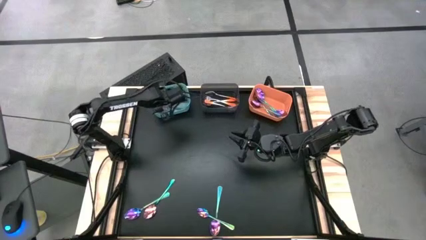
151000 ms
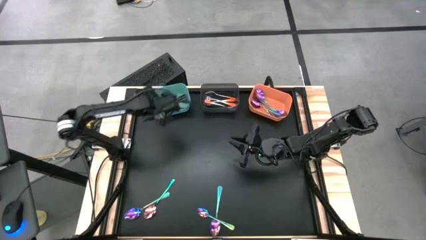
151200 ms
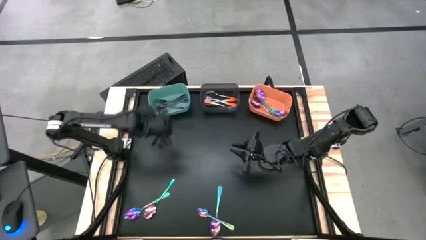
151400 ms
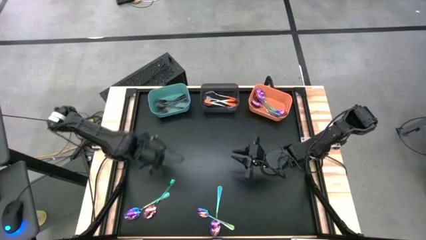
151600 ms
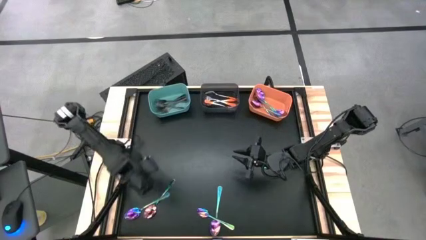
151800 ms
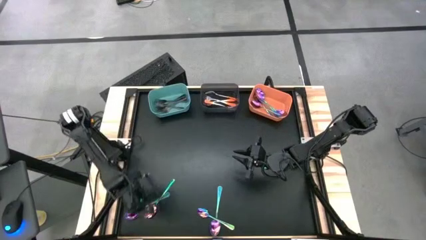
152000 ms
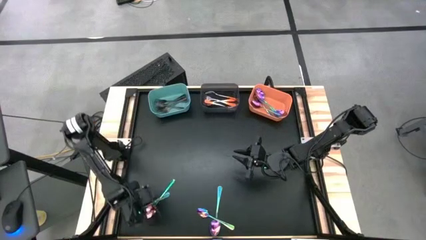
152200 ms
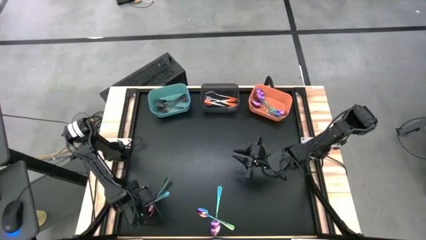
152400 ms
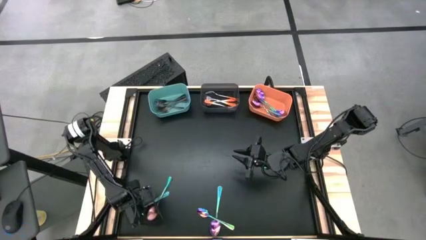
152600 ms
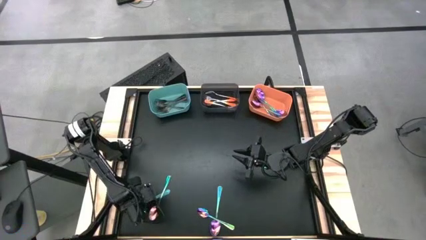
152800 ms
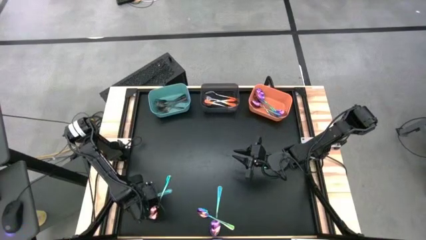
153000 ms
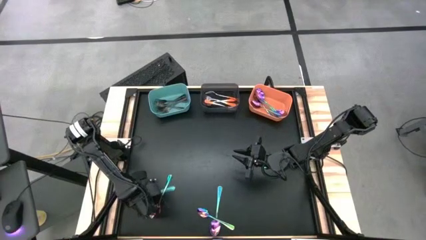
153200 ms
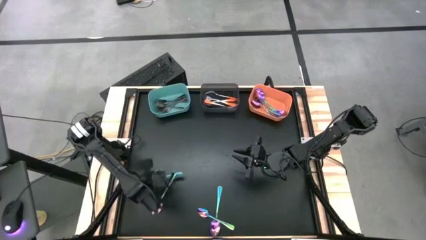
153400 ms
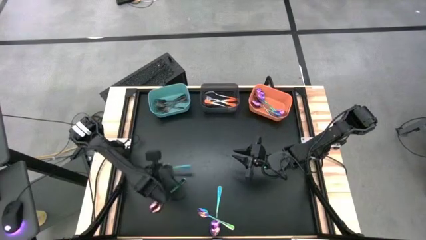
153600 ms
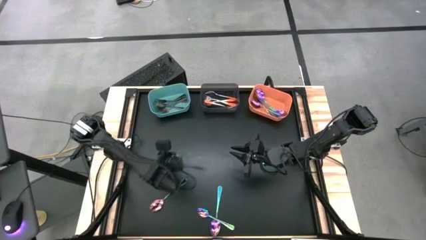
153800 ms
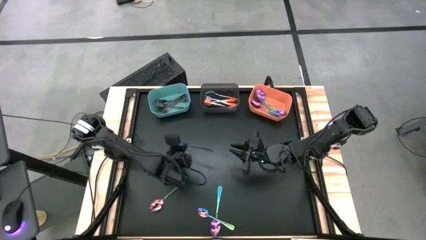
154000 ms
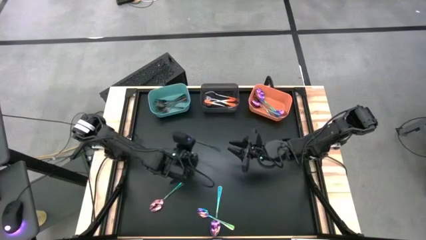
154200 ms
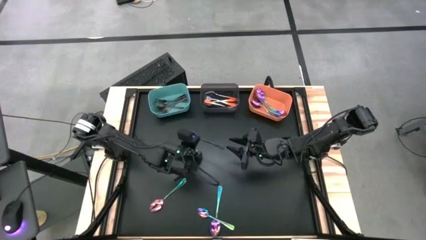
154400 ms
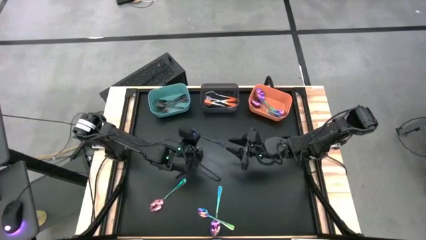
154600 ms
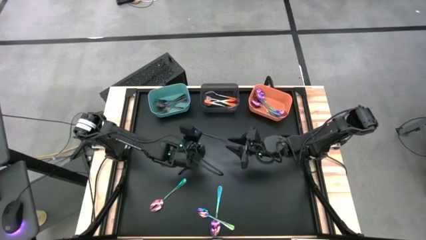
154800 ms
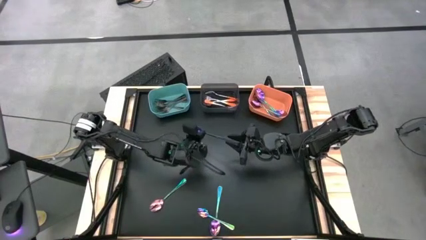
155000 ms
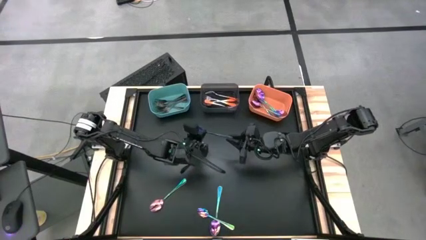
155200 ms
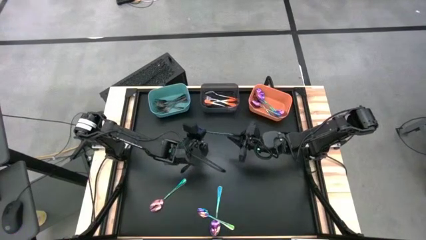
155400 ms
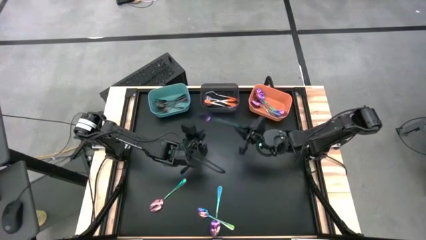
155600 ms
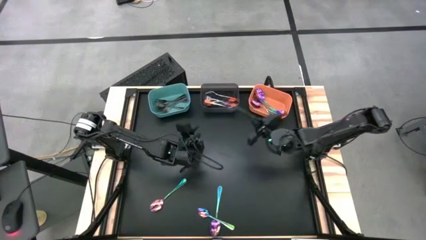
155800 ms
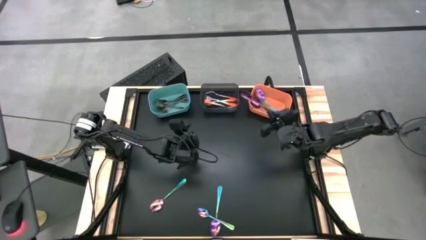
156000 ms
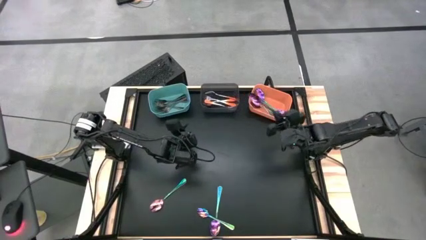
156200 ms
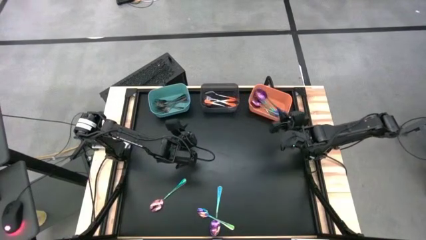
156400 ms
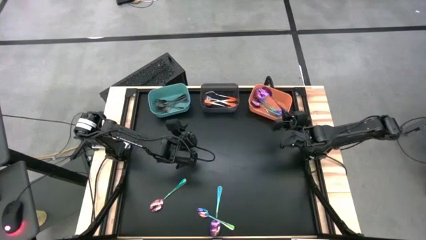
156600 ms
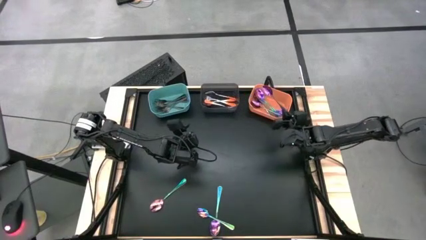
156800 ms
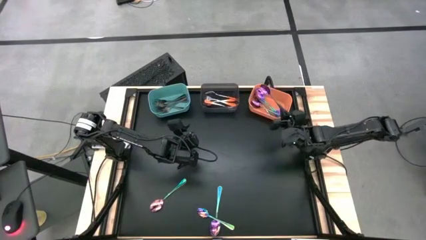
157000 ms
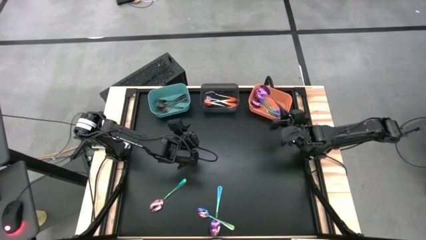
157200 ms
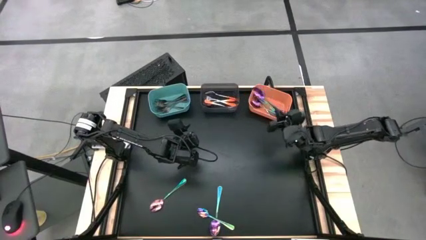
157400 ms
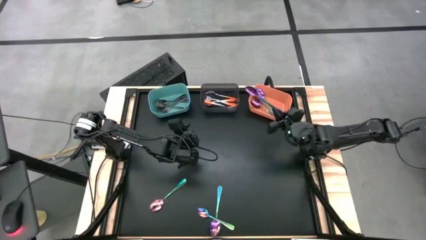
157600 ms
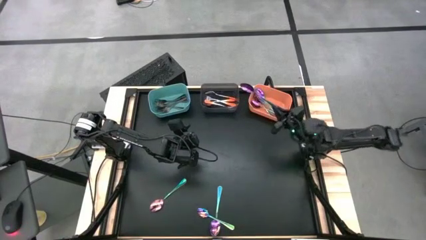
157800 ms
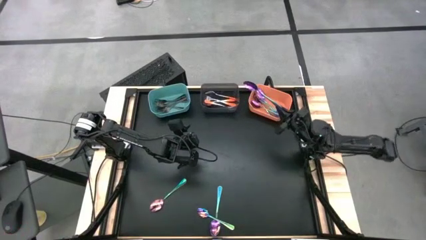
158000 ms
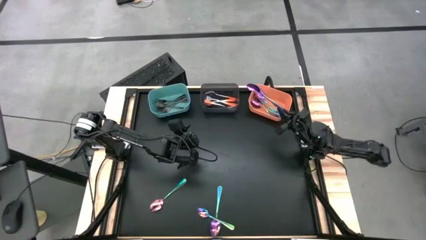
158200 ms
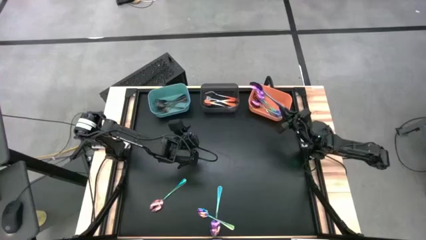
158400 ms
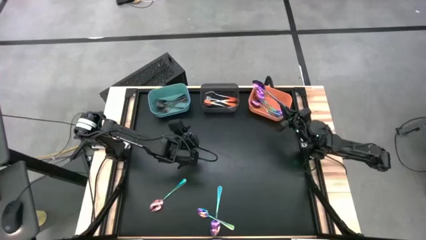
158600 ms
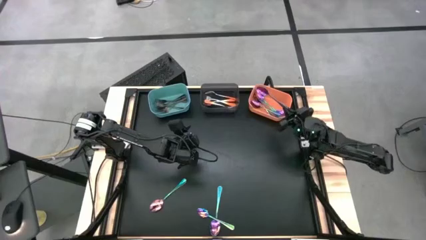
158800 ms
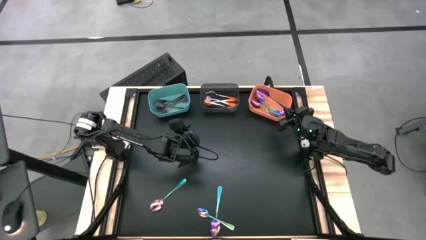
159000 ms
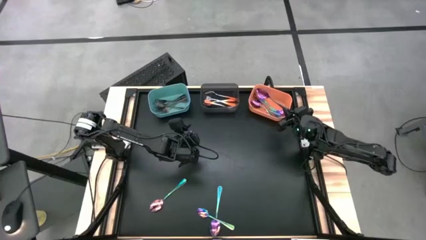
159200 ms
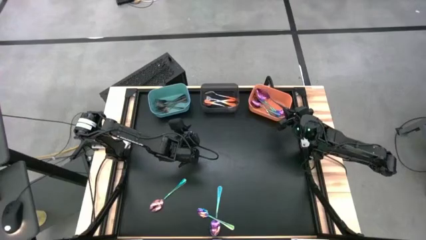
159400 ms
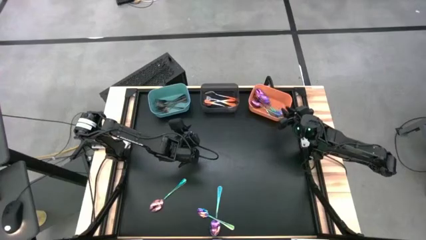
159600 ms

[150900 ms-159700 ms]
Task: Sort silverware by color (type)
Put the blue spoon into the orange bin

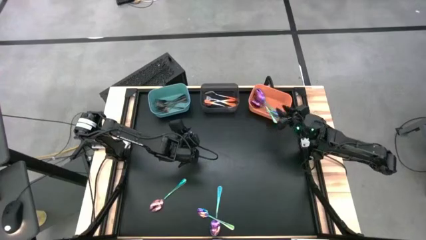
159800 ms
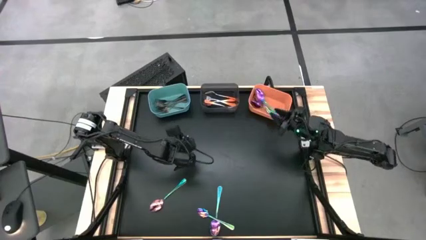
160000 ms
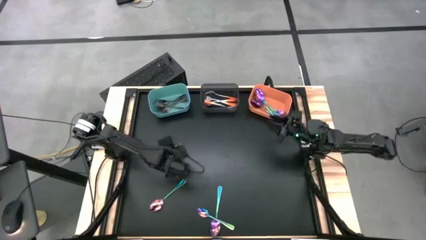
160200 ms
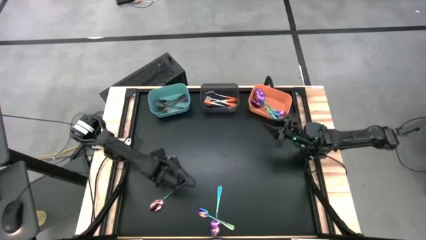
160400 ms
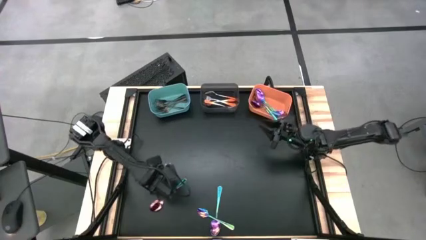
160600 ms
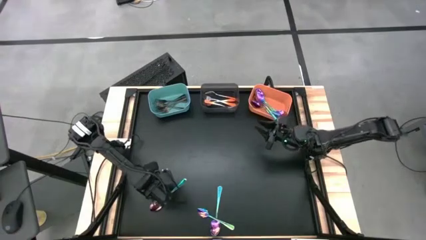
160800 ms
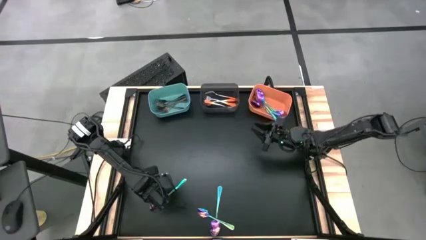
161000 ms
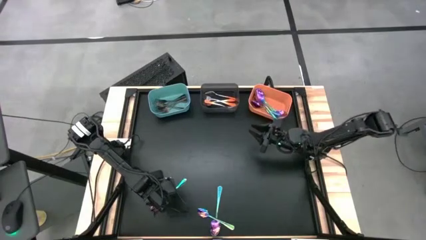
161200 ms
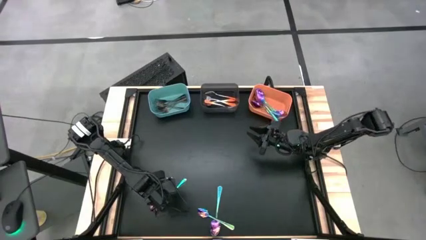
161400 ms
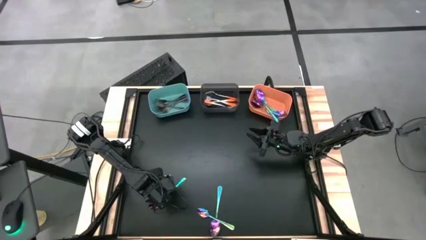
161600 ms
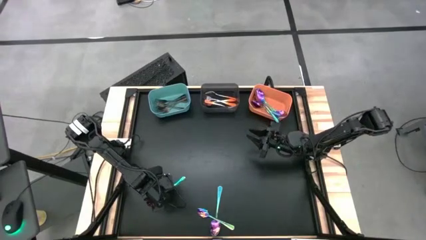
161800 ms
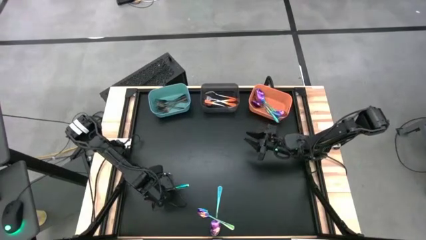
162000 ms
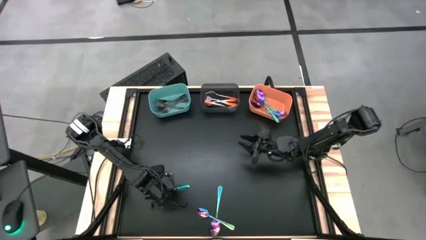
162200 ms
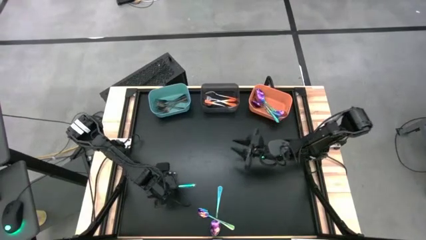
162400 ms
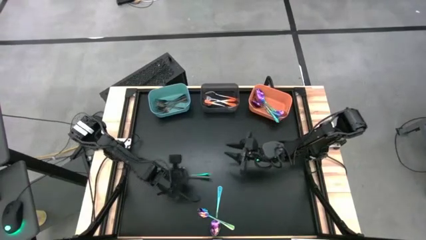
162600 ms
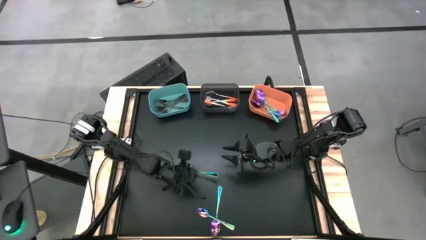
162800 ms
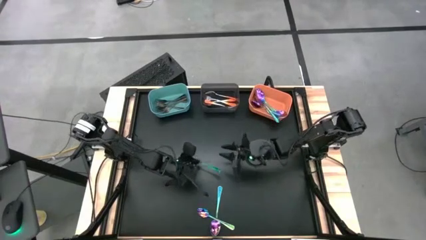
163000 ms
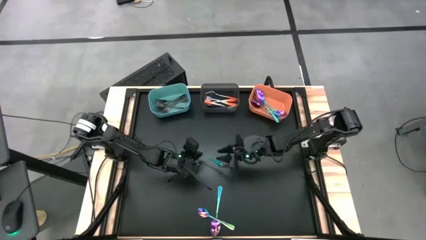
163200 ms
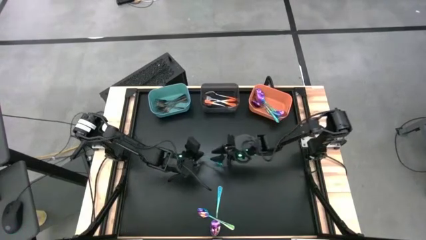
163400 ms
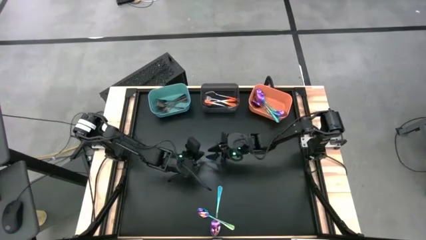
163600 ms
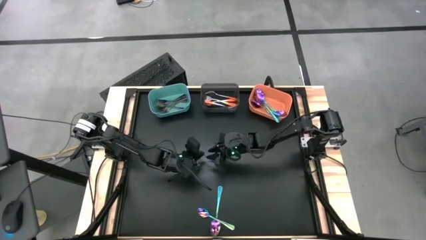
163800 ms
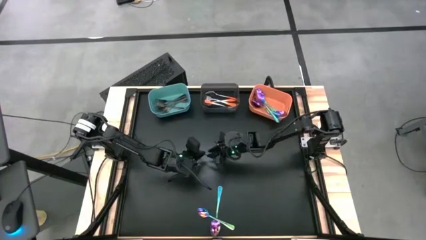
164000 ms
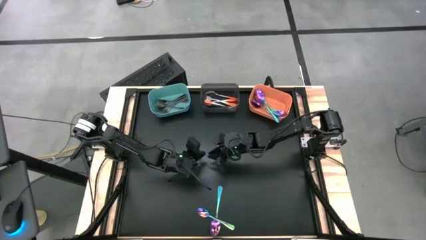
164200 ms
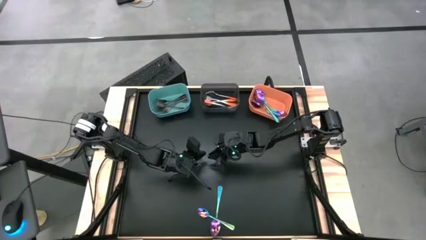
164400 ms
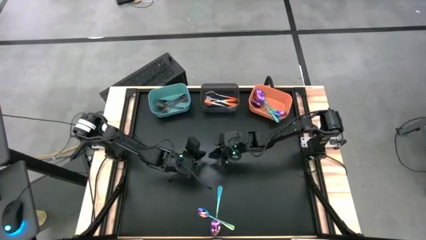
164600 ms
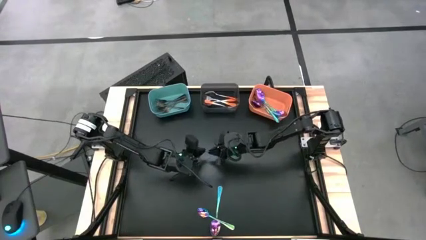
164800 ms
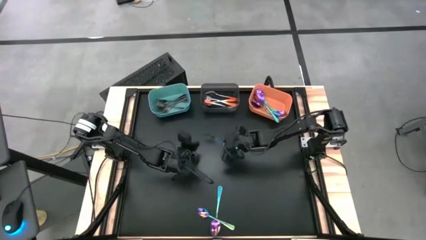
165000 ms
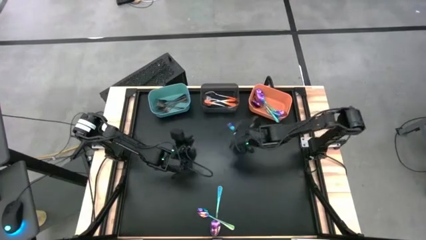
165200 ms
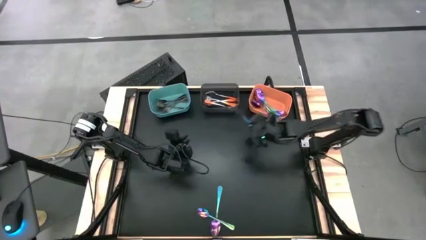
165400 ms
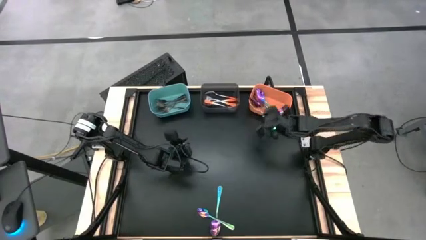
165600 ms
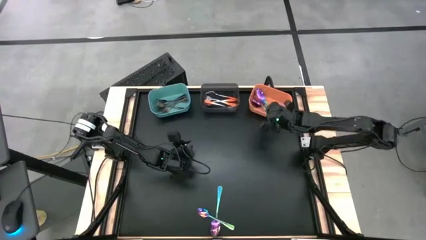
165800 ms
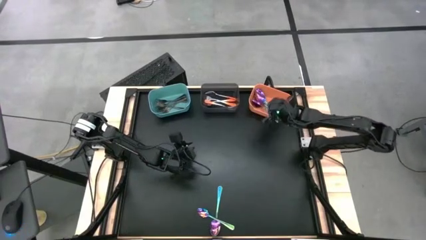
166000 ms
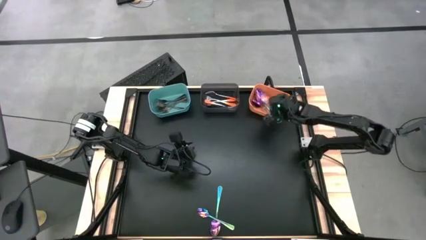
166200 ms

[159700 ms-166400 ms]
Put the blue spoon into the orange bin

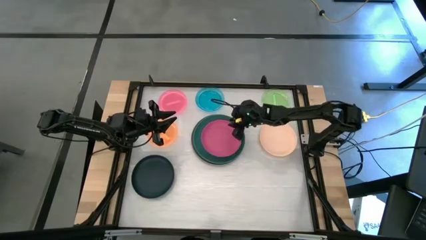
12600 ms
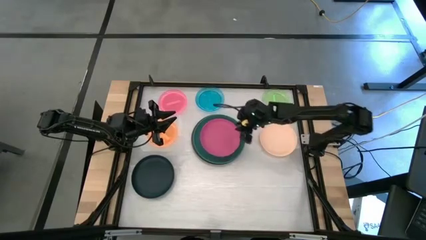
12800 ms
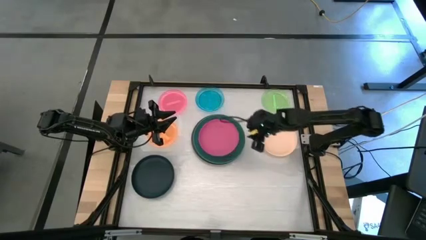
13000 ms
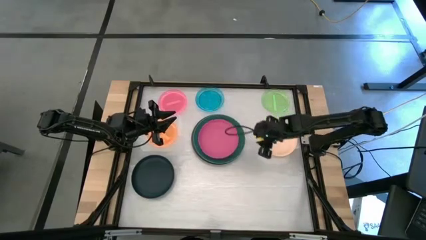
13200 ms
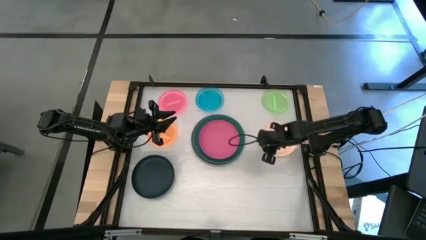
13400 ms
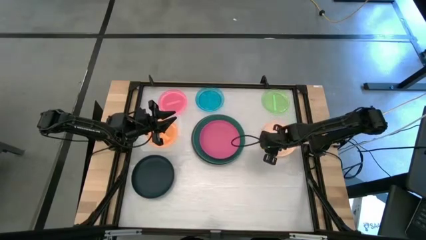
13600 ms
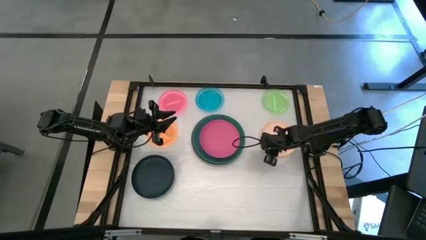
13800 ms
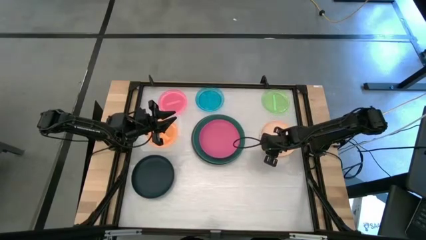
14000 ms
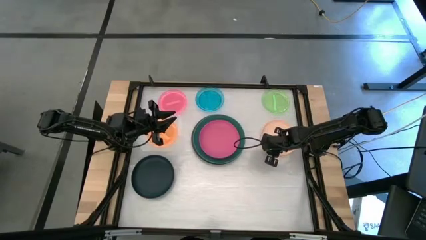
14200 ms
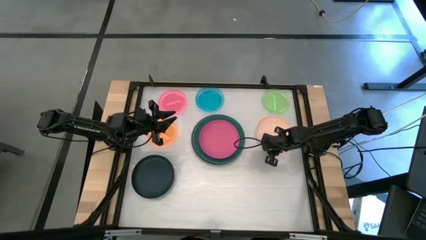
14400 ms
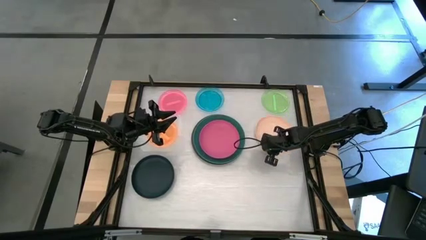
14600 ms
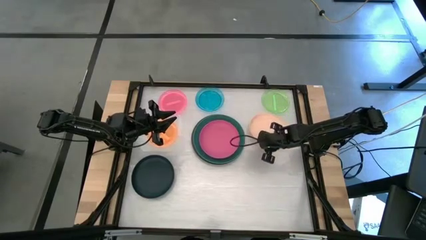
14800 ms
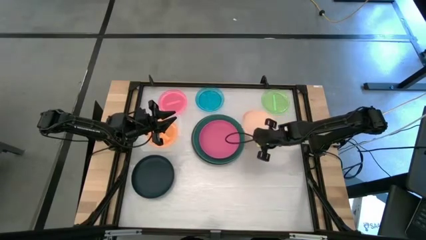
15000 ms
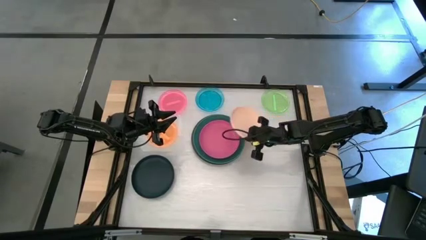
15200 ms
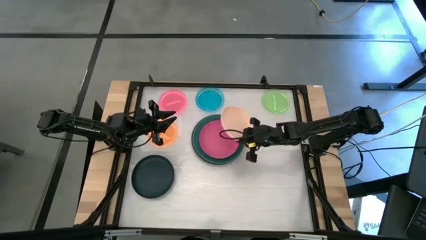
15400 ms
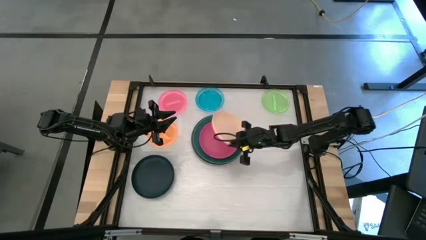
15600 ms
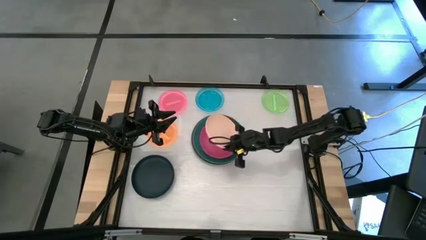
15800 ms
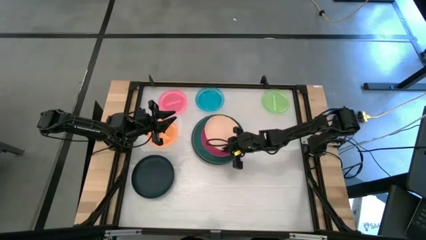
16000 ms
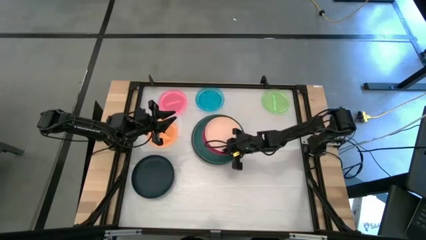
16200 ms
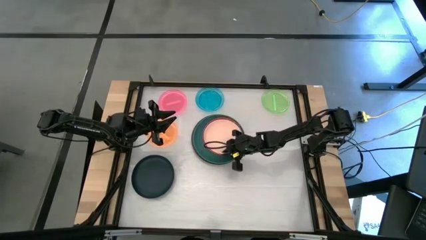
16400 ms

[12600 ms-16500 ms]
Task: Stack plastic plates
Stack the light orange plate on top of the pink plate
